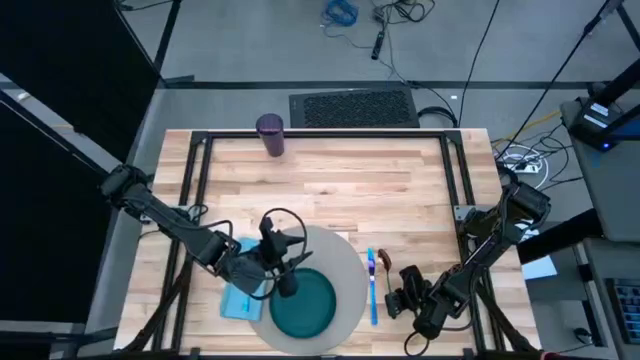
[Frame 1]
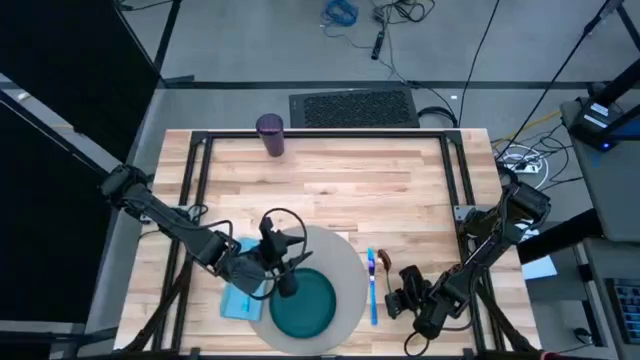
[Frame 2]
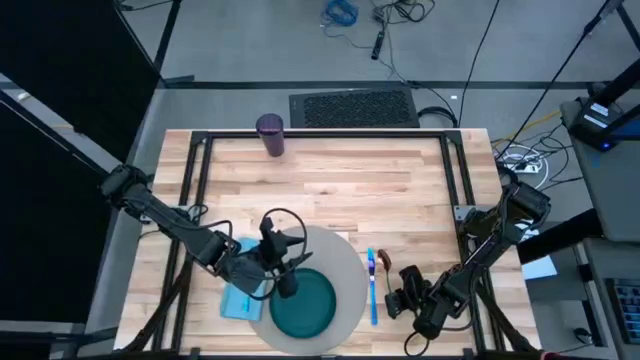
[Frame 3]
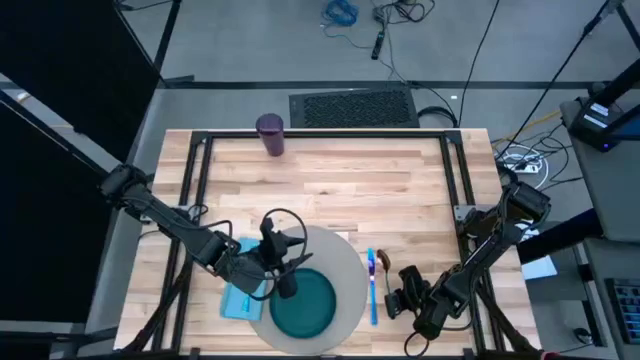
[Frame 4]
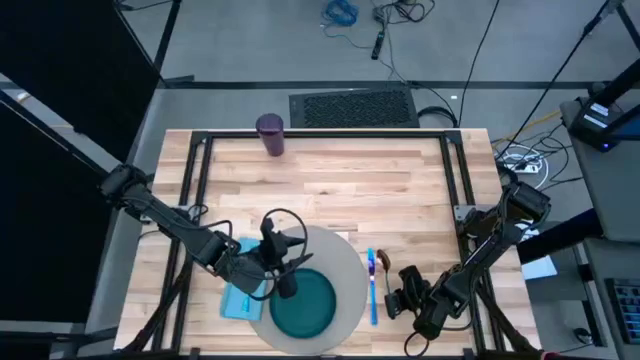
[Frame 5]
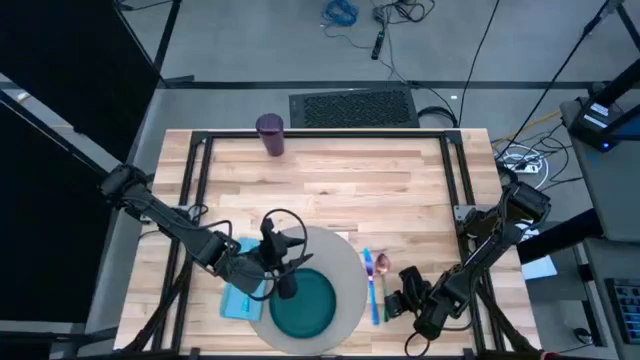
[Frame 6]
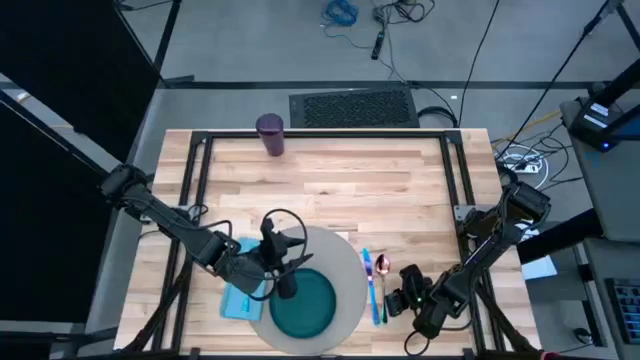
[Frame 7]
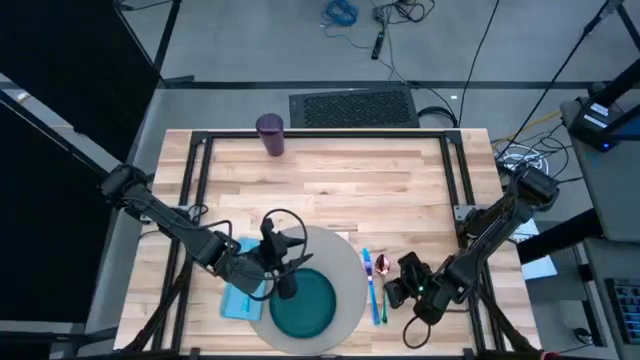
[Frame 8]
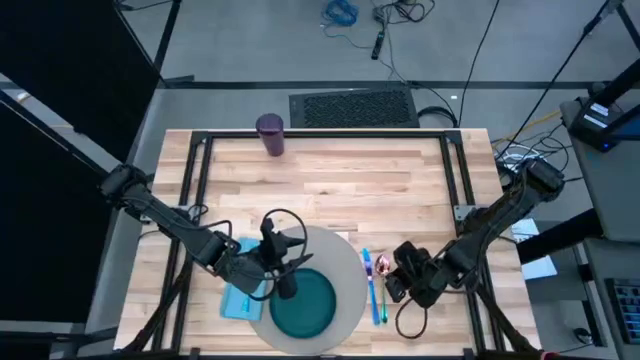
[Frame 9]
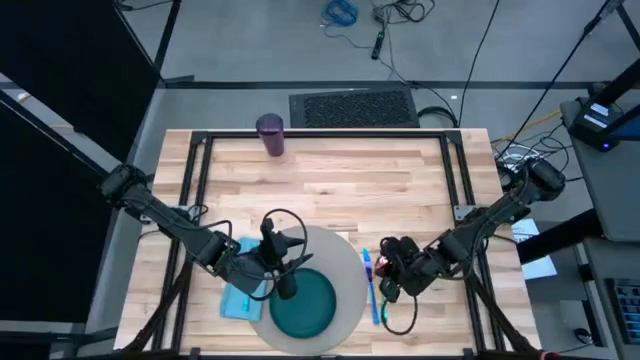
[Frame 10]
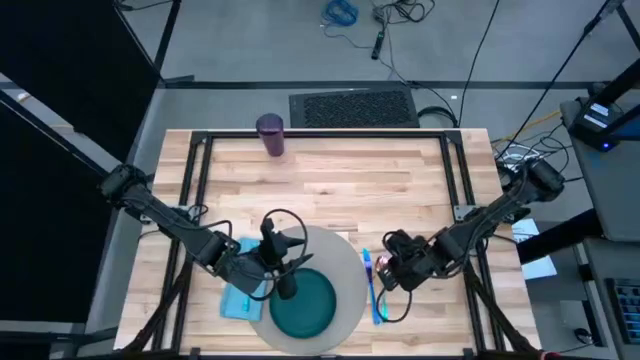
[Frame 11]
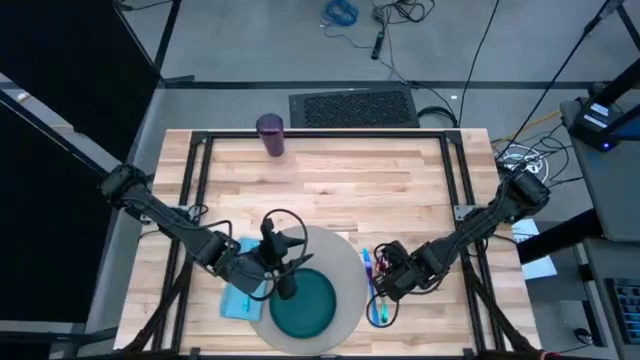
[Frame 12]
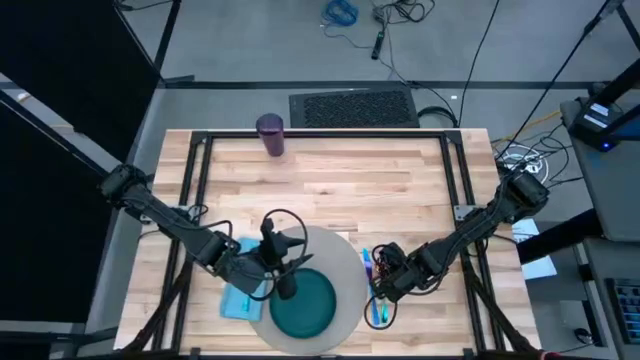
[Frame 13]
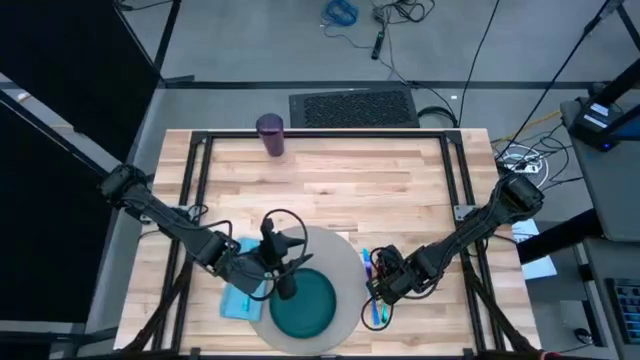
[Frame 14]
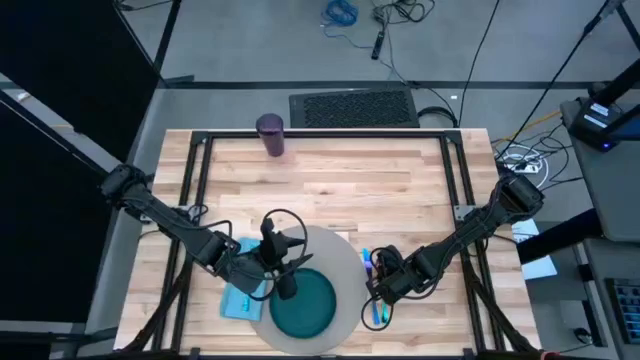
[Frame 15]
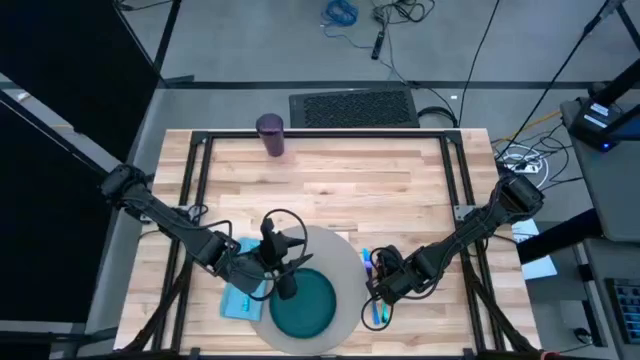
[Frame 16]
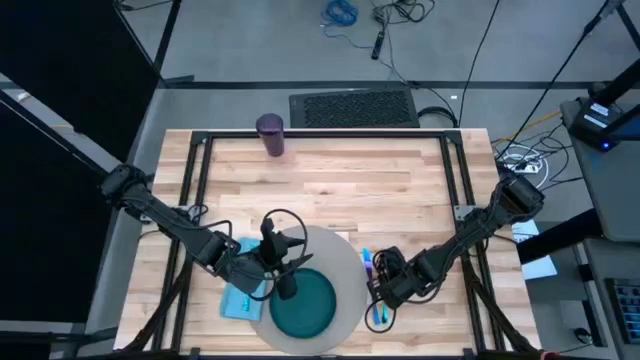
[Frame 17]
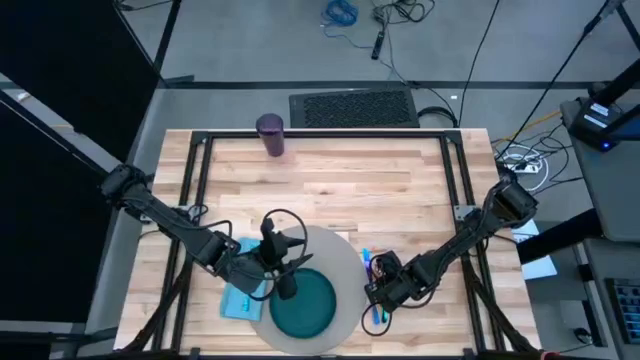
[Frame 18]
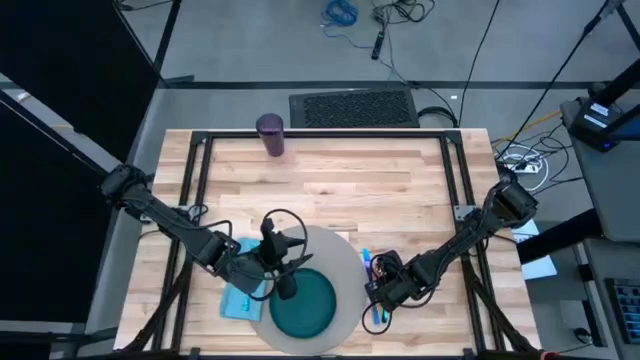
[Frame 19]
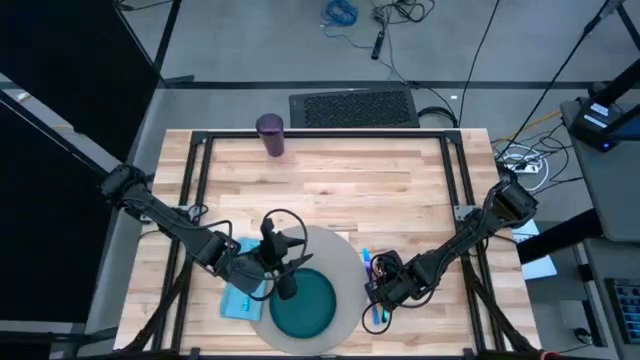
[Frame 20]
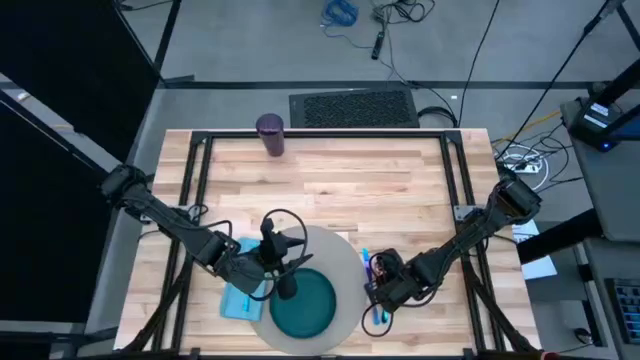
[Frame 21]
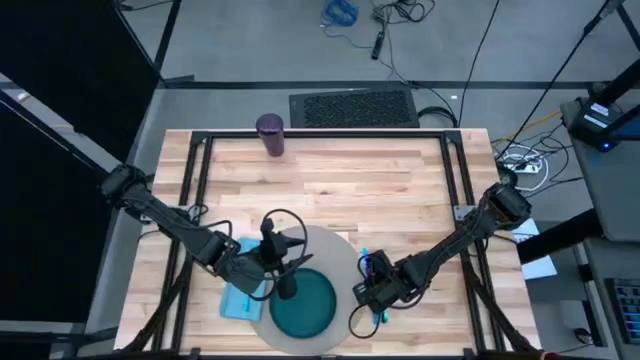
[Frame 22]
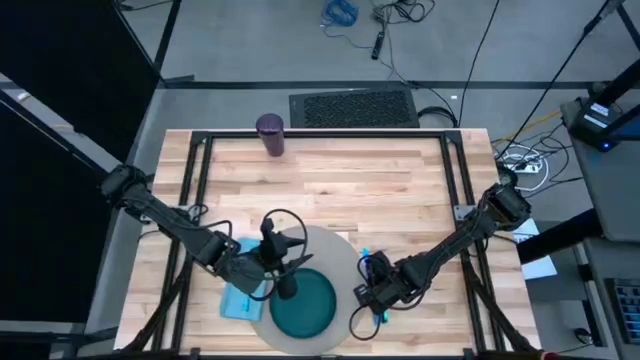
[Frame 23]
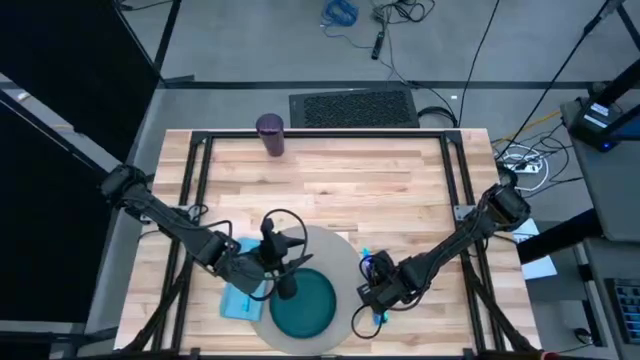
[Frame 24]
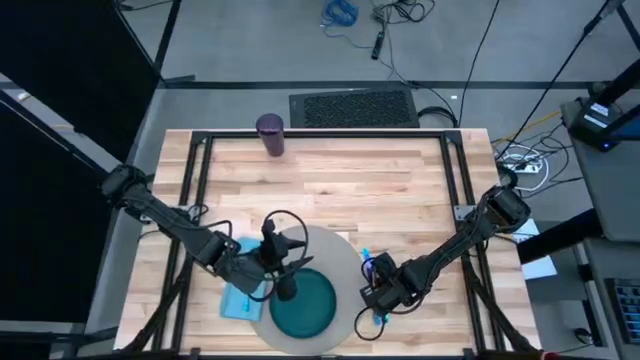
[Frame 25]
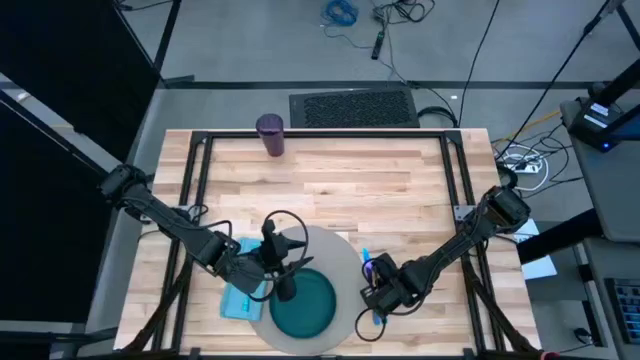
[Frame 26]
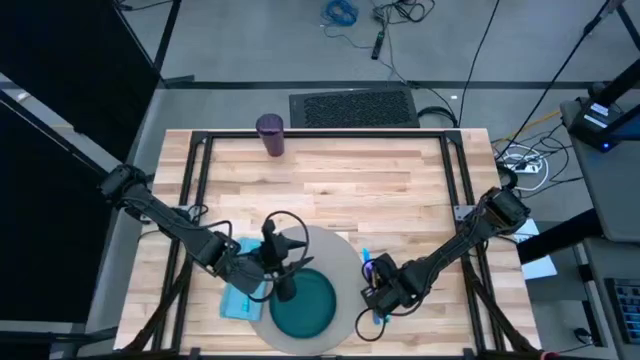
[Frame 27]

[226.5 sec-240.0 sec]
Task: Set table place
Put the blue spoon to the right of the blue table knife

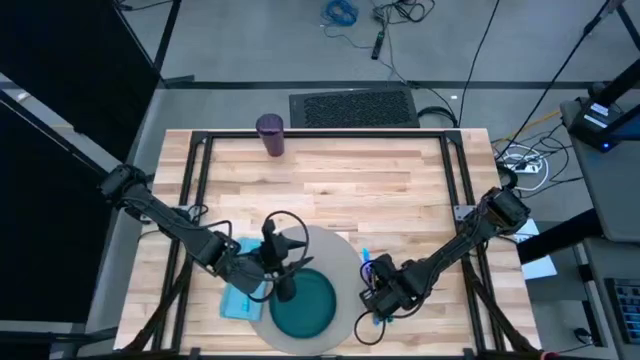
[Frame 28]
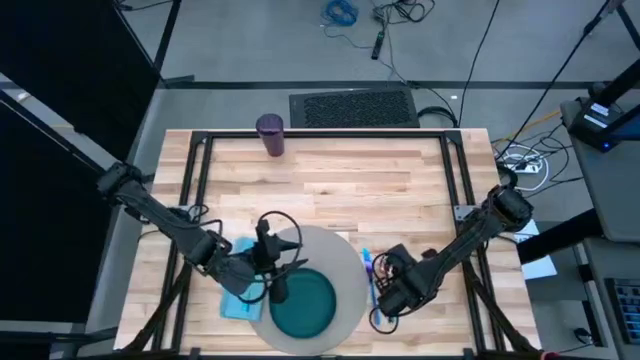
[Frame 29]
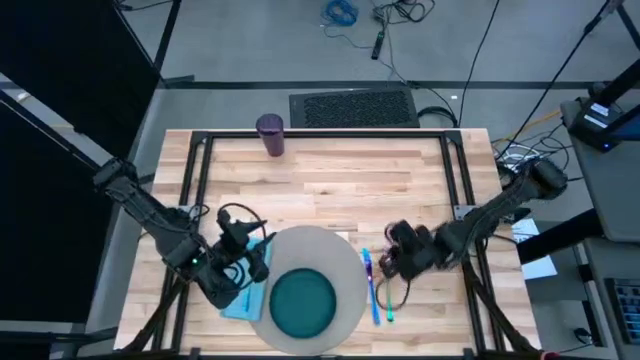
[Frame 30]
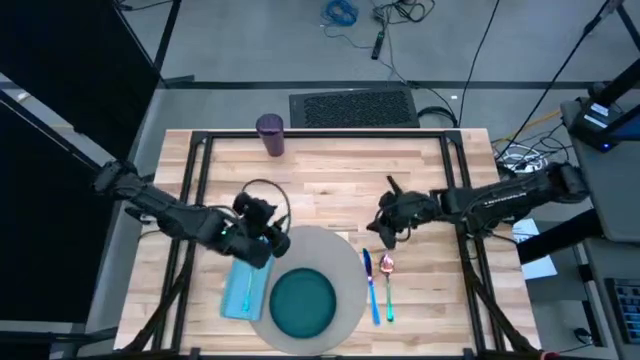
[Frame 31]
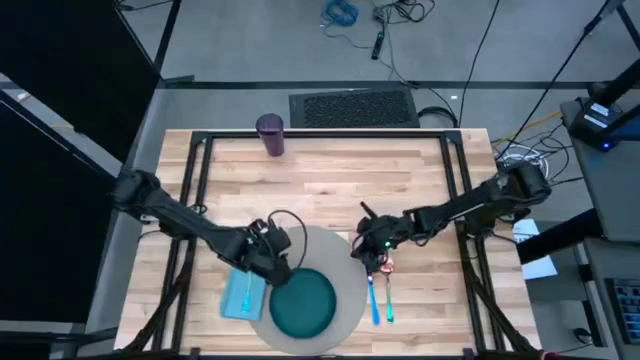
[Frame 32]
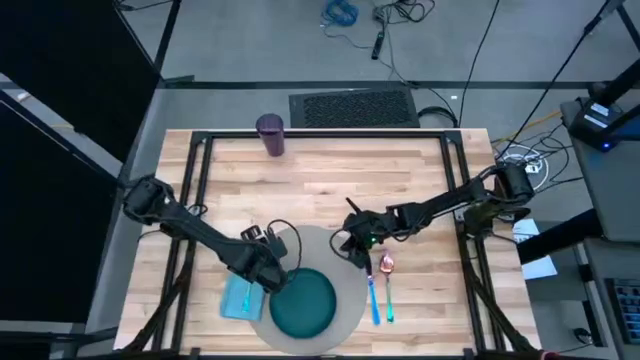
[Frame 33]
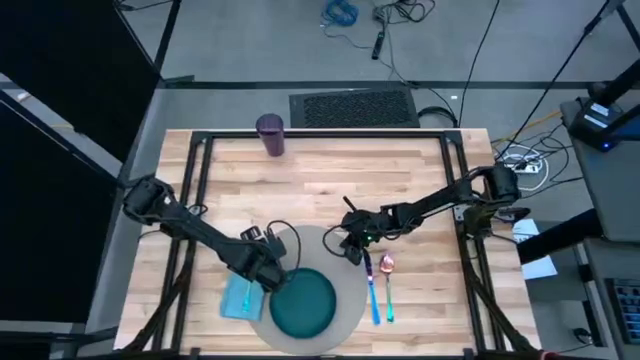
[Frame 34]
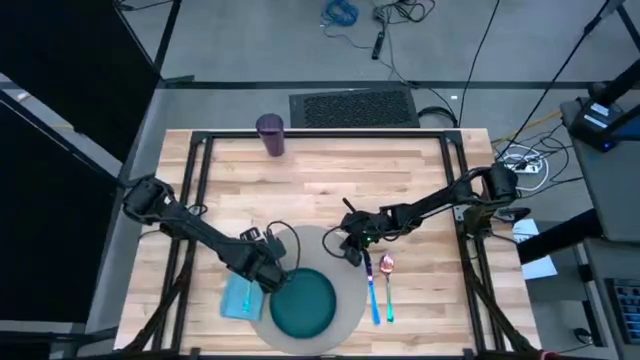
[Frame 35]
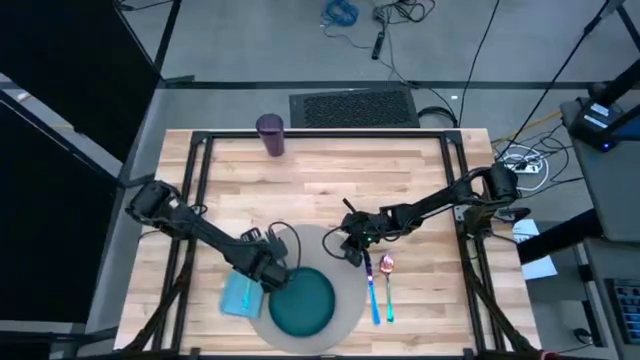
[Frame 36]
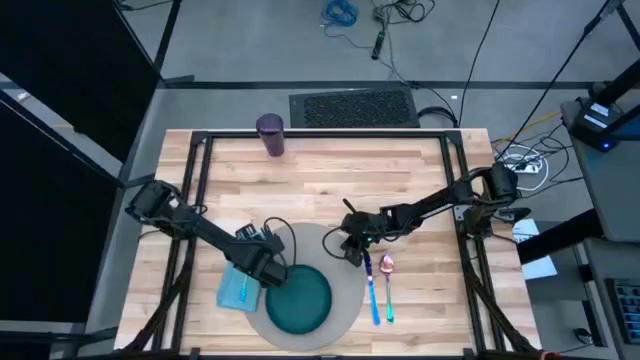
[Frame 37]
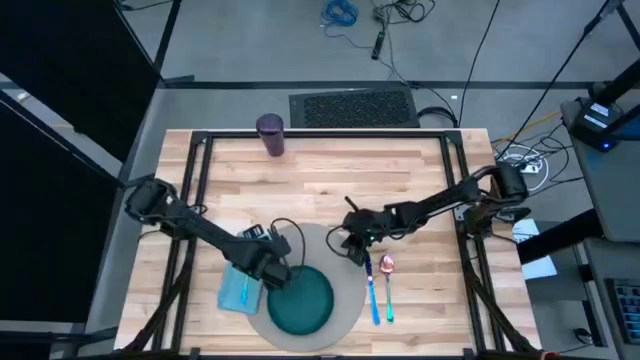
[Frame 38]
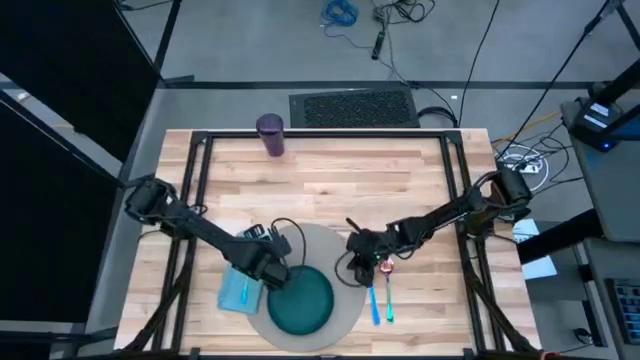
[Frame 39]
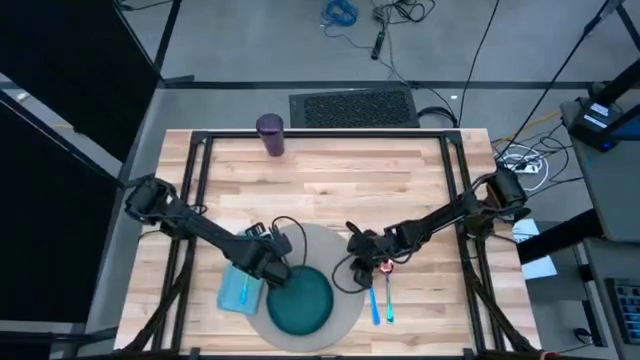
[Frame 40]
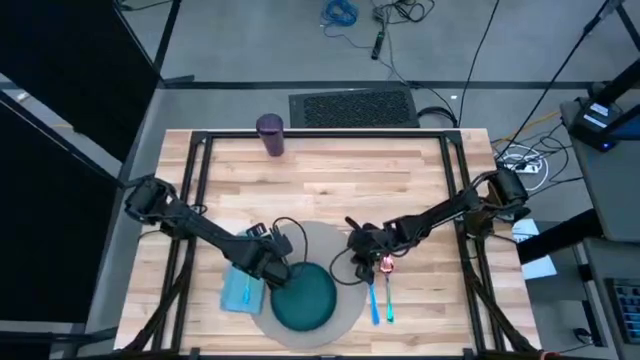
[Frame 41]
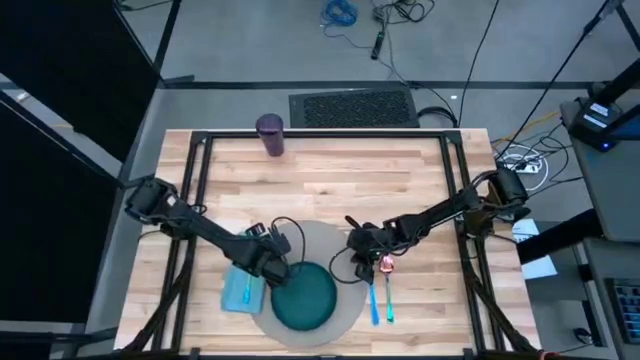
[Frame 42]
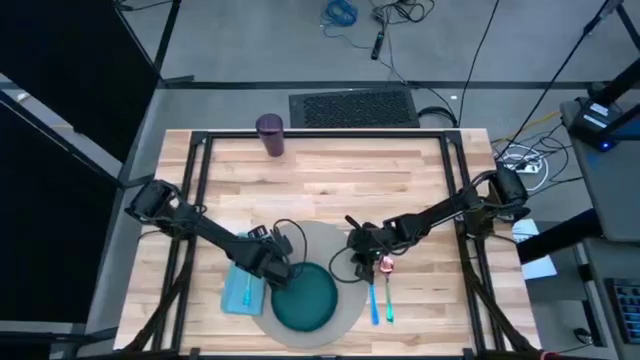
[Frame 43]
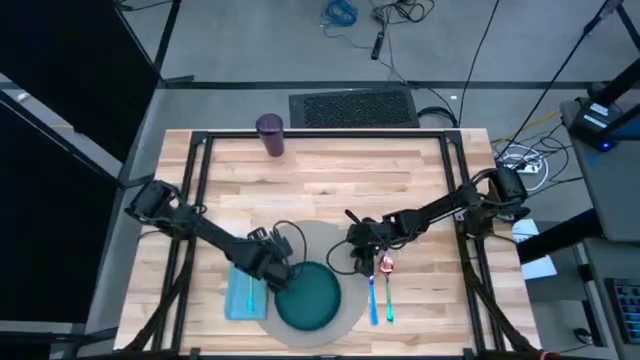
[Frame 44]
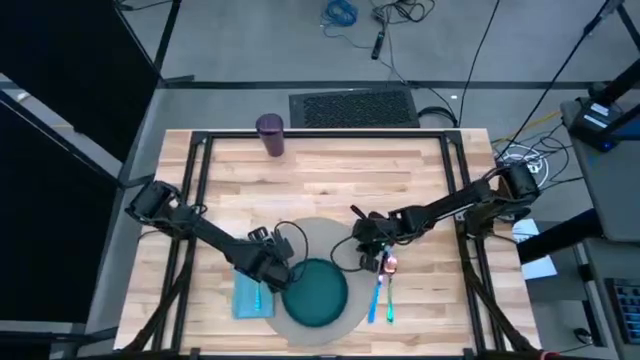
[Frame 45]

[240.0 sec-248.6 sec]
Adjust the gray placemat
